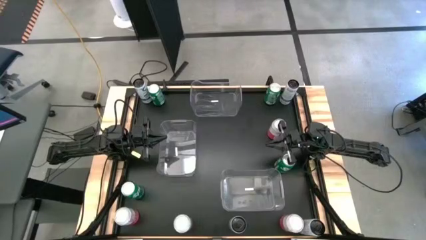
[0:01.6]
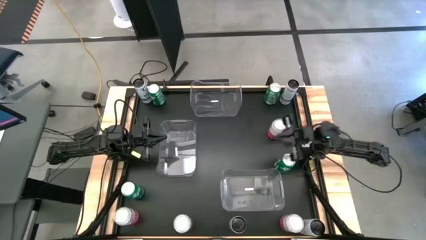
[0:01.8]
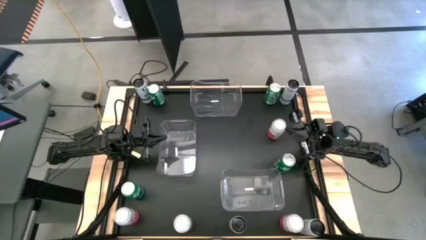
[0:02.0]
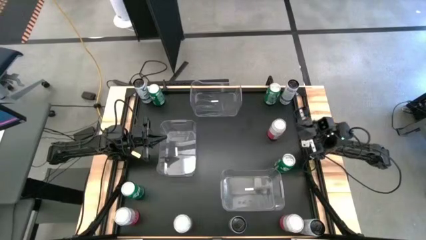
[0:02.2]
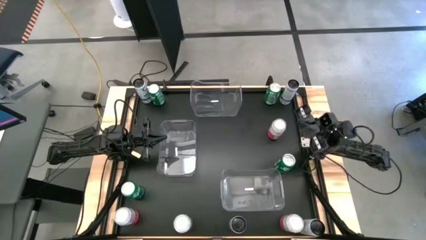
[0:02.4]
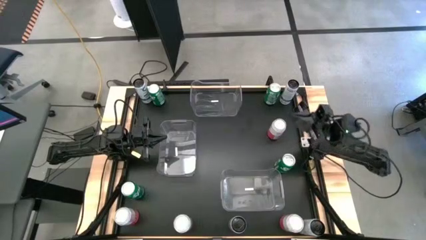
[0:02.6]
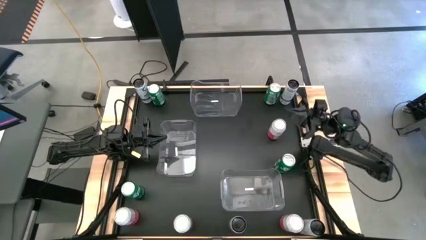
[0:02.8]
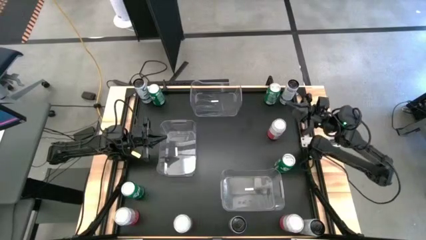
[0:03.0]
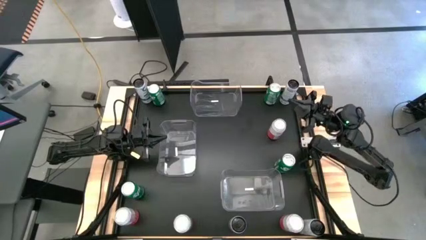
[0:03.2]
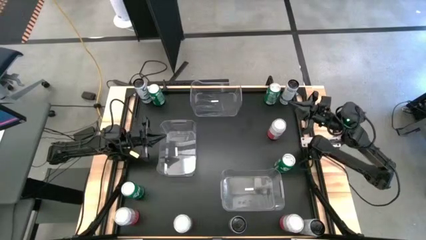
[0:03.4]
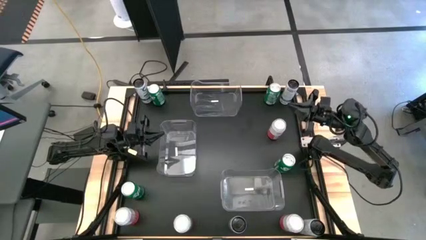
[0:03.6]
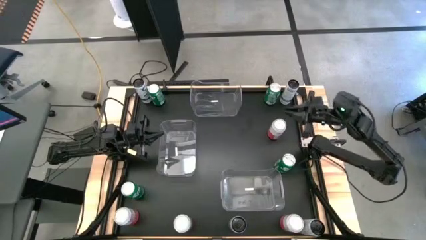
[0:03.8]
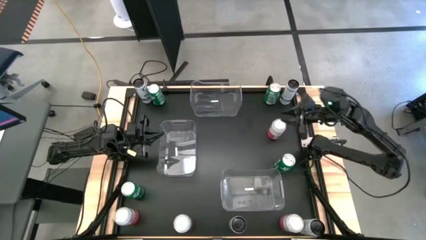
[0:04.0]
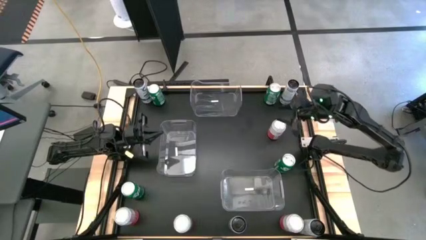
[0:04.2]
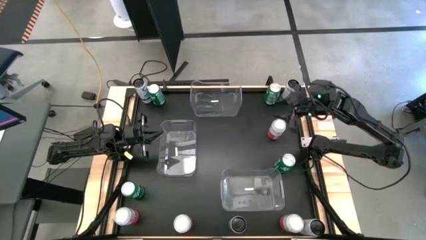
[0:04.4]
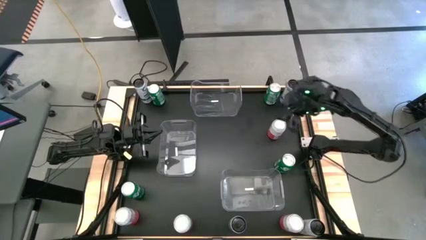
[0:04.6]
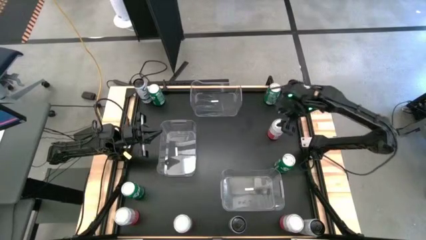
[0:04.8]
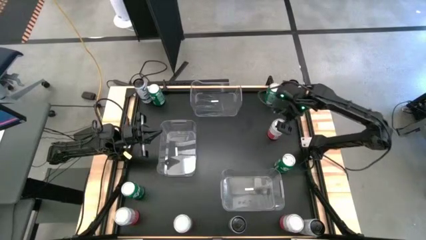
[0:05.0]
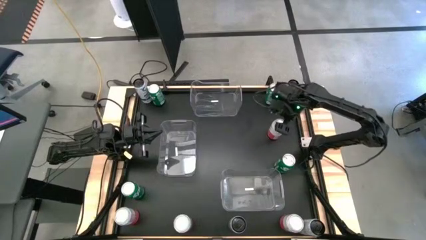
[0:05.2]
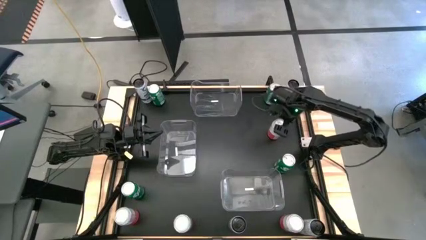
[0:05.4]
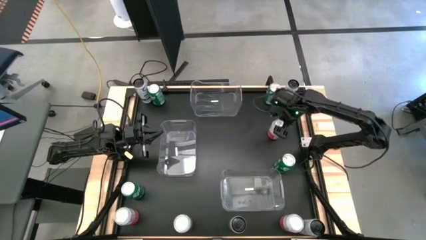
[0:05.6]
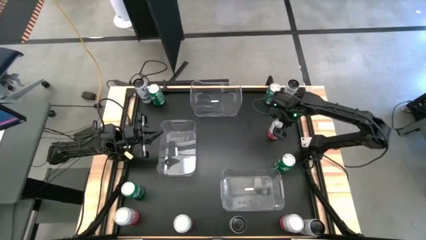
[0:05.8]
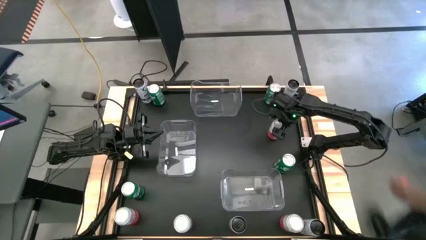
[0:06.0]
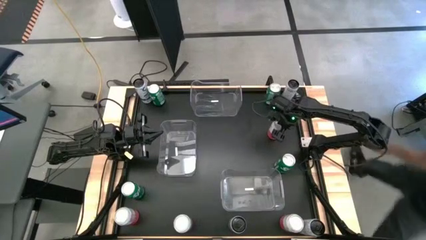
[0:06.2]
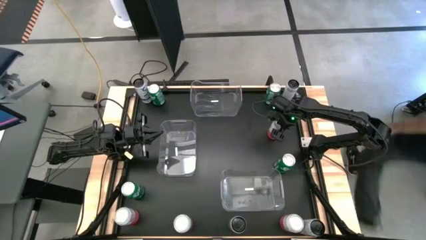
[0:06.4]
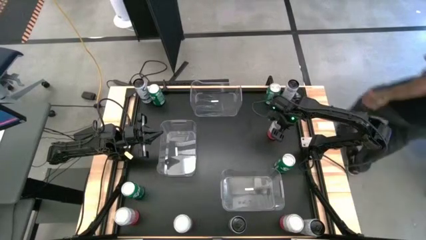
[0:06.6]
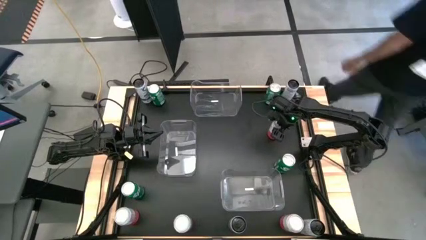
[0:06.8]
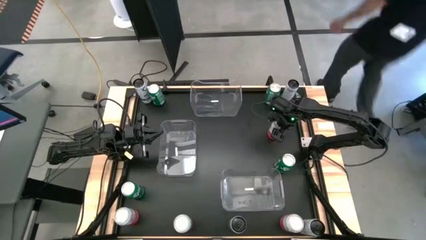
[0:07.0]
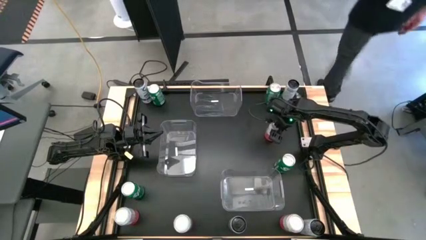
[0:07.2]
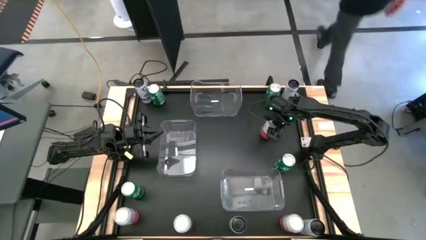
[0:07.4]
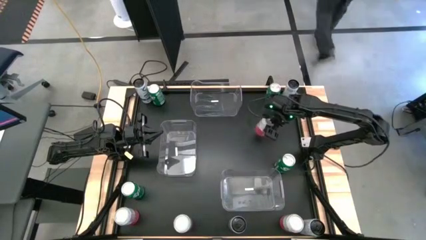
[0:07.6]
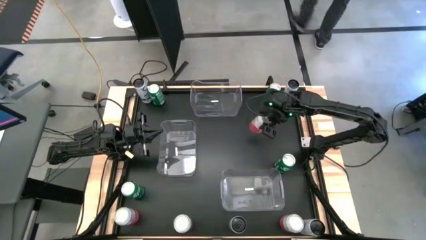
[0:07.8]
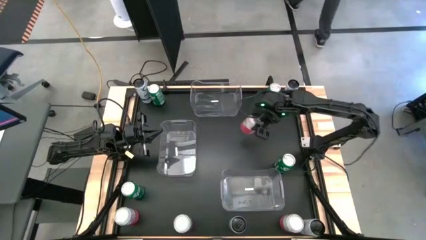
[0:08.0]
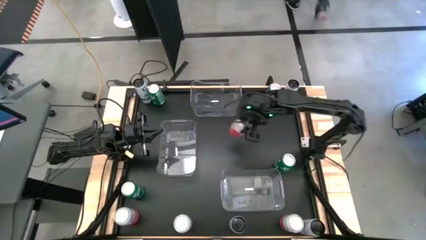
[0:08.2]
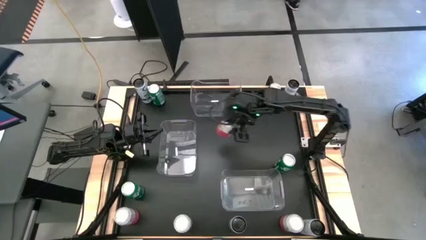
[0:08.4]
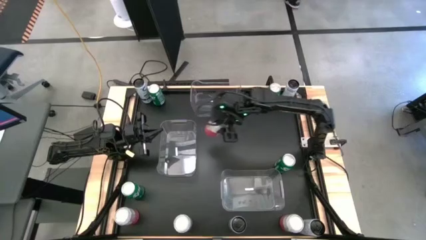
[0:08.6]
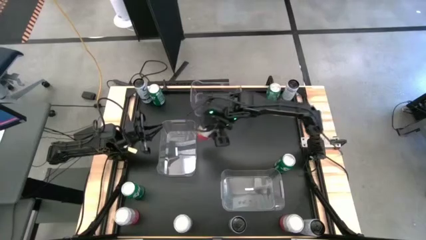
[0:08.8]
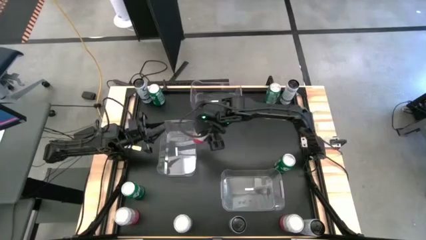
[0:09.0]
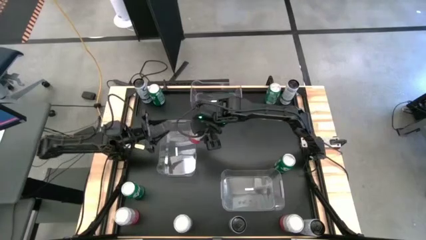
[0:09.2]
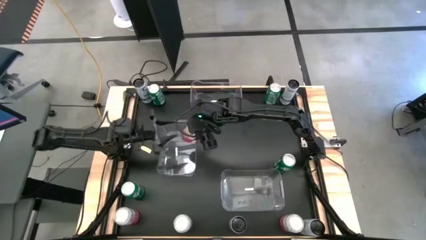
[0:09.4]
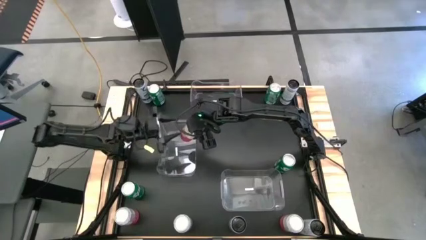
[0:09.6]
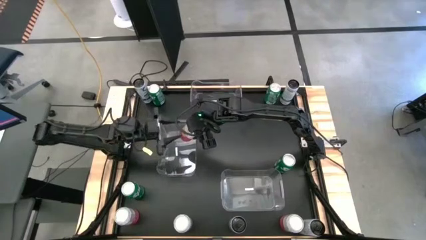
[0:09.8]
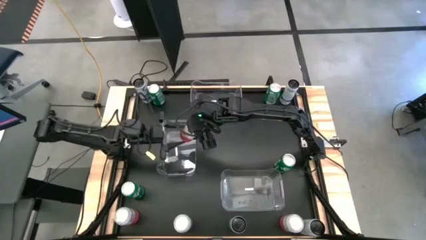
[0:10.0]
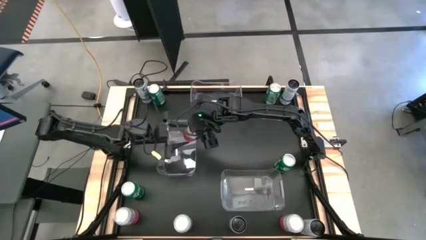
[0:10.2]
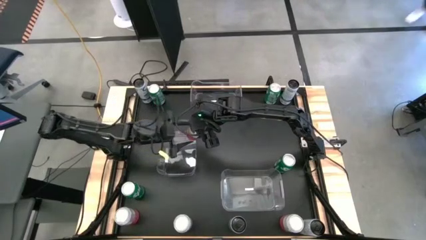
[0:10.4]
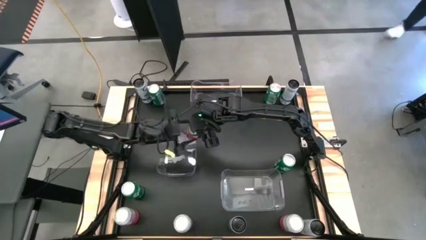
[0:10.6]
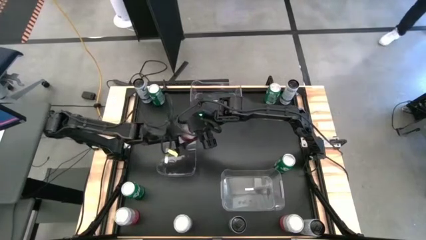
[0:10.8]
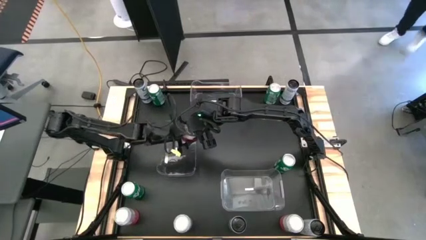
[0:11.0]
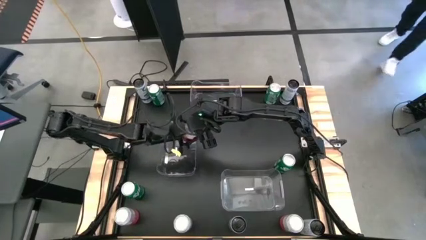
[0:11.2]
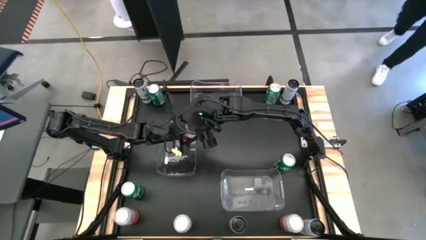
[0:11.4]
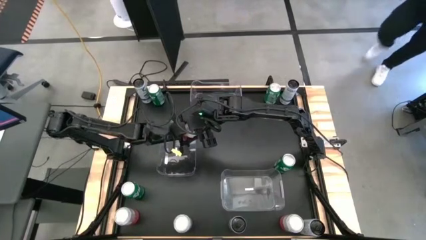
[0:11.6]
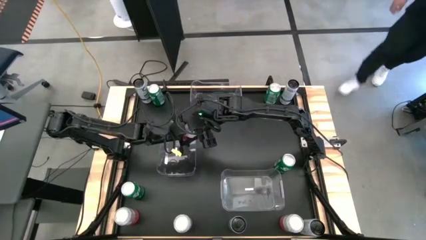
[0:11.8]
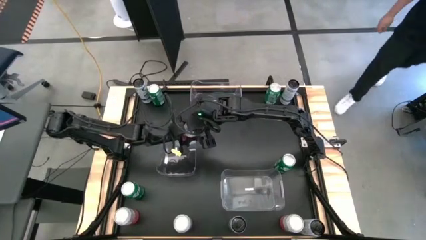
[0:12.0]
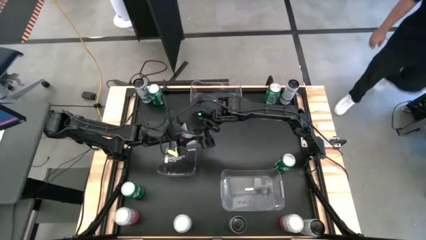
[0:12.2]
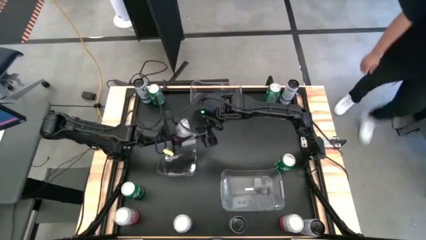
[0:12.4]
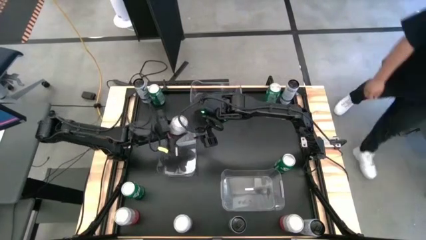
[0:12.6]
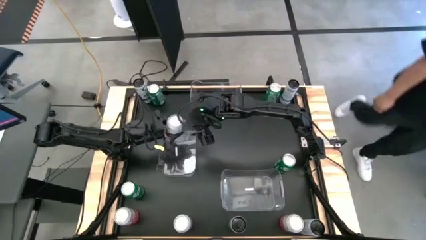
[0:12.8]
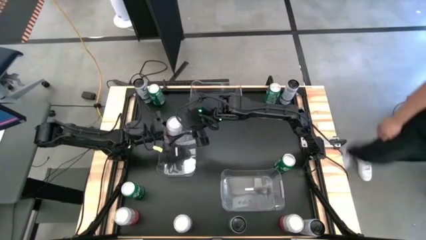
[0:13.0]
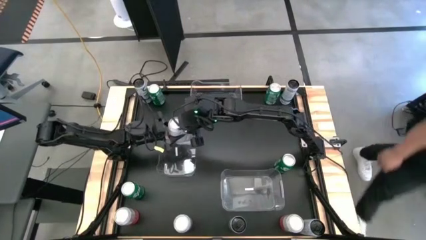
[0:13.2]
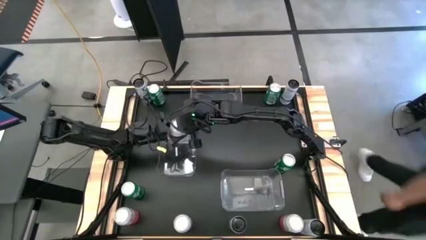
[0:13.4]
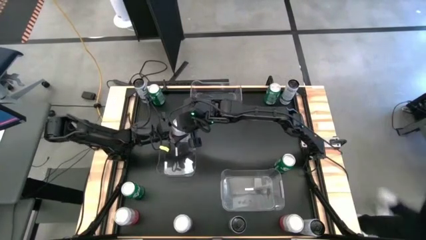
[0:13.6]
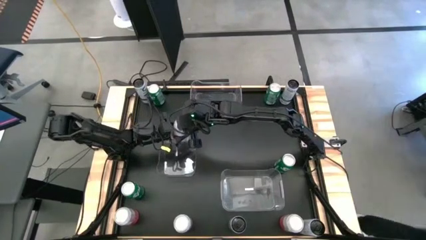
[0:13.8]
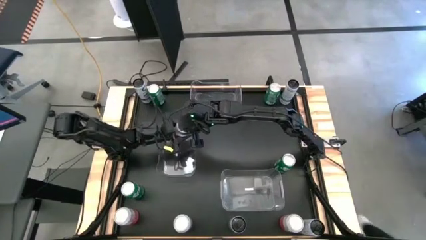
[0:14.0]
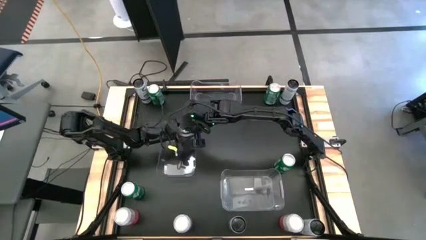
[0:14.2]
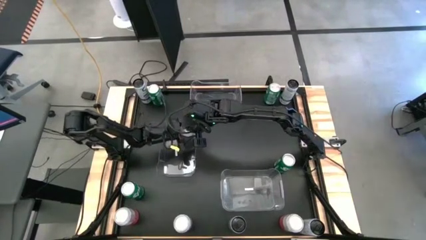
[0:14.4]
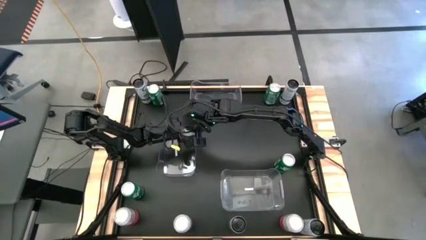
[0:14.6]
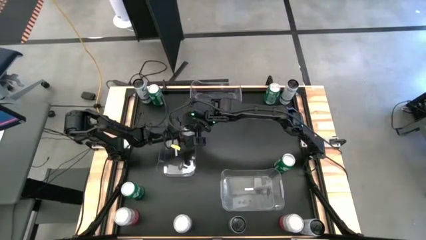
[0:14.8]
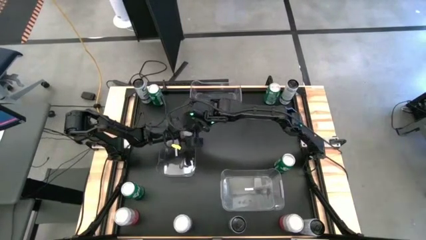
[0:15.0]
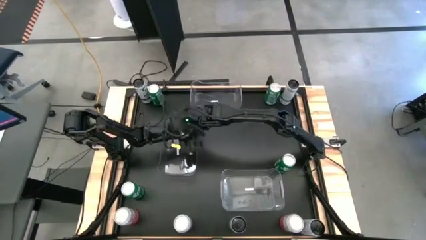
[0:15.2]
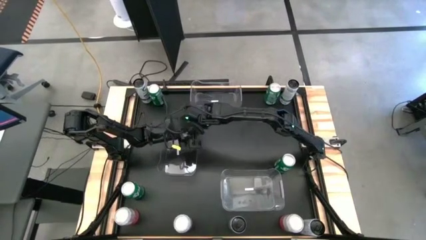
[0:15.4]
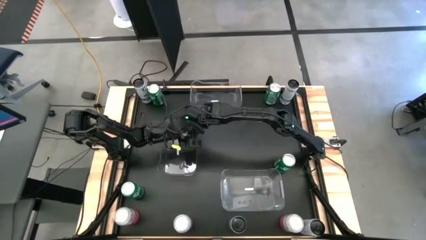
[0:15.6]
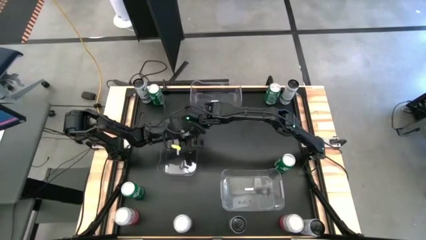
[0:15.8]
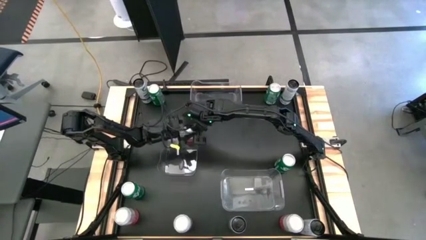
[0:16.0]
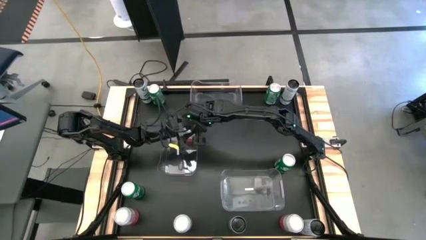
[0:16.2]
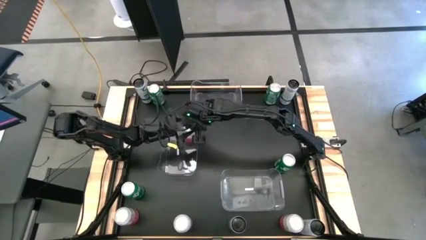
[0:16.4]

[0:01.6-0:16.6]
Task: Sort soda cans
Put the pink soda can into the middle transparent bin
